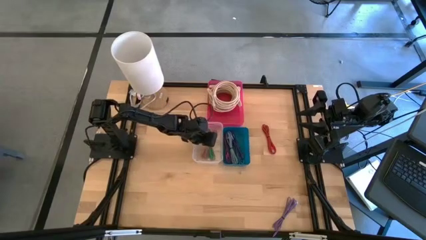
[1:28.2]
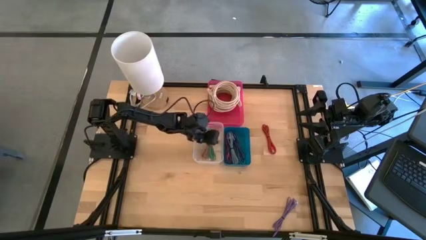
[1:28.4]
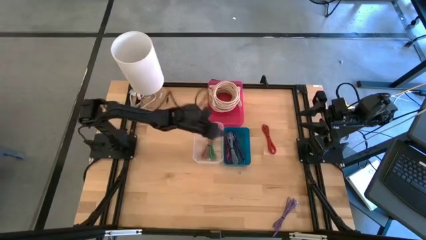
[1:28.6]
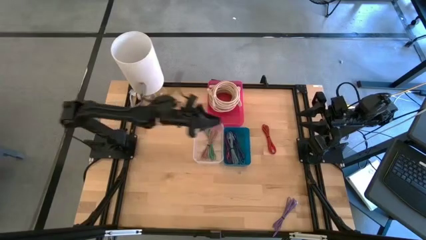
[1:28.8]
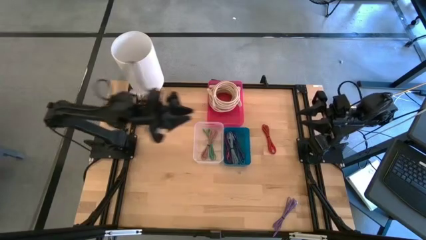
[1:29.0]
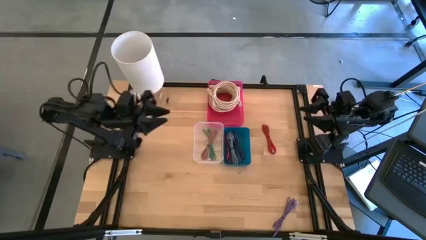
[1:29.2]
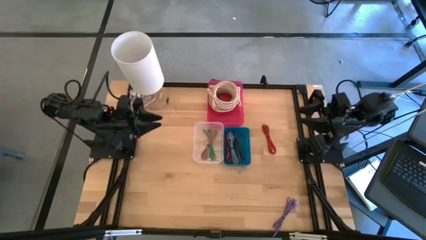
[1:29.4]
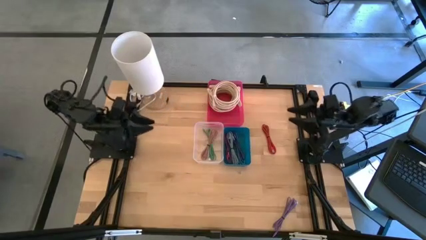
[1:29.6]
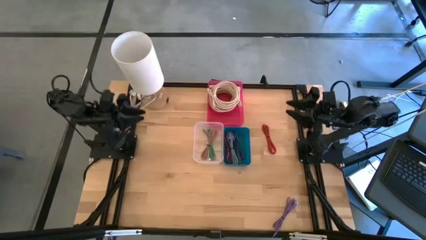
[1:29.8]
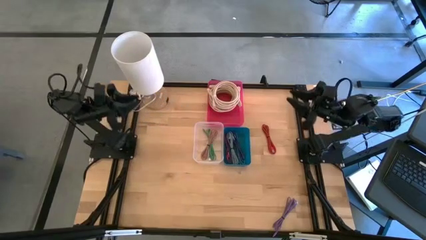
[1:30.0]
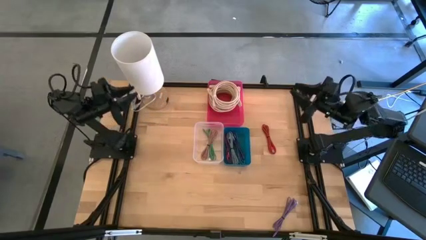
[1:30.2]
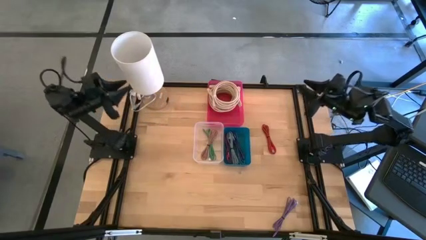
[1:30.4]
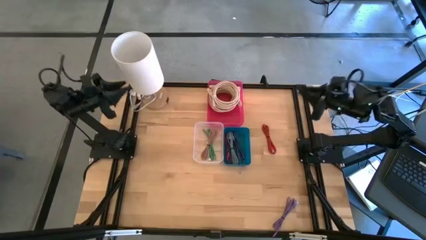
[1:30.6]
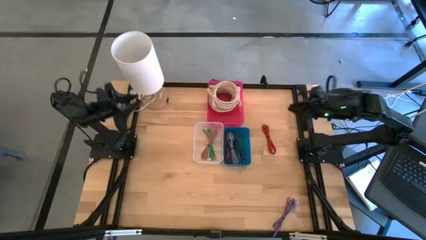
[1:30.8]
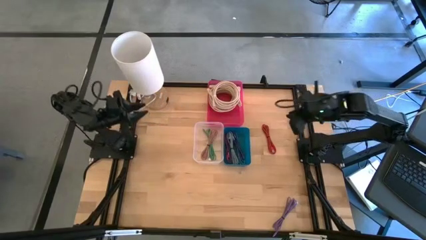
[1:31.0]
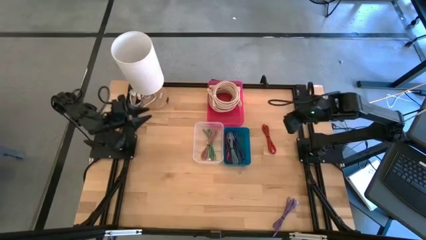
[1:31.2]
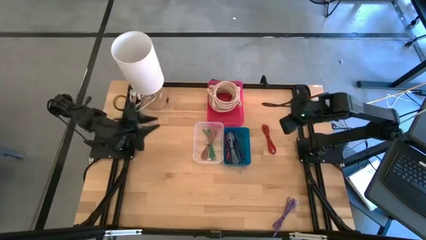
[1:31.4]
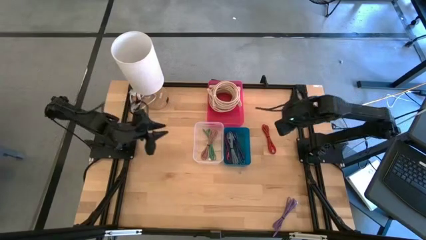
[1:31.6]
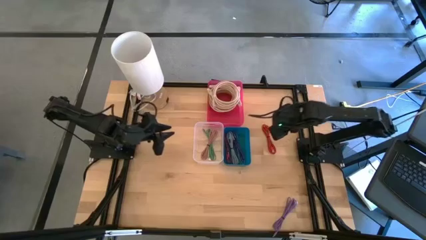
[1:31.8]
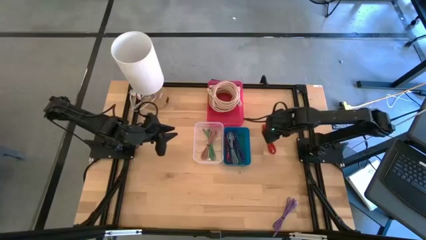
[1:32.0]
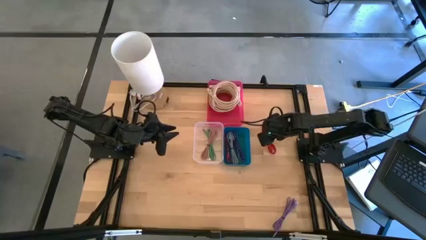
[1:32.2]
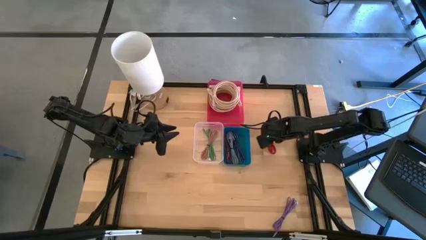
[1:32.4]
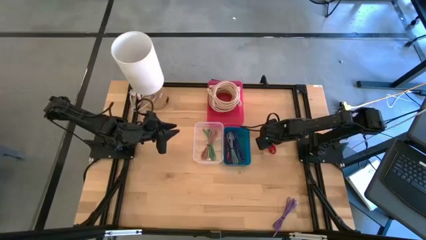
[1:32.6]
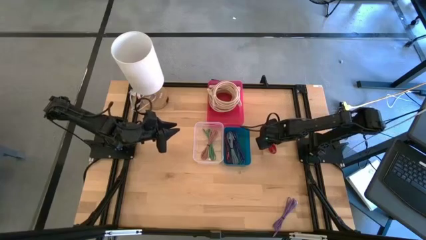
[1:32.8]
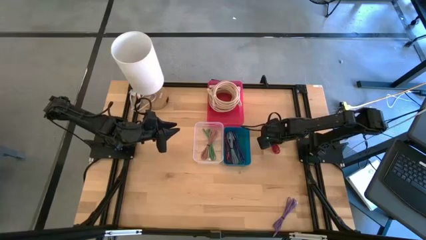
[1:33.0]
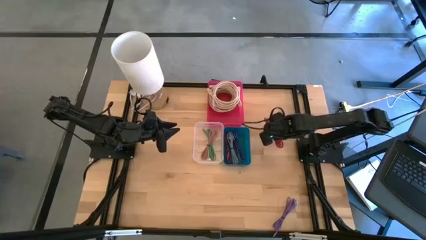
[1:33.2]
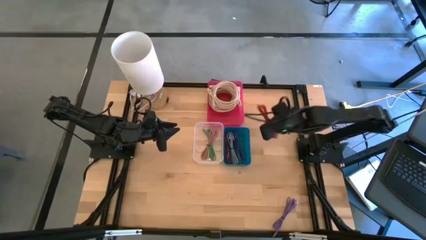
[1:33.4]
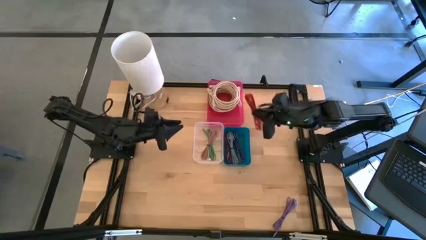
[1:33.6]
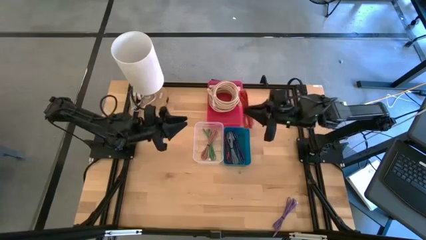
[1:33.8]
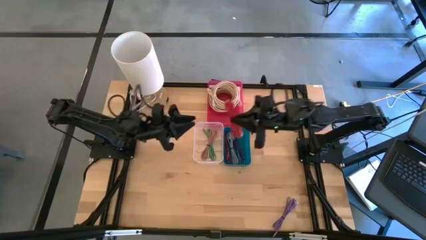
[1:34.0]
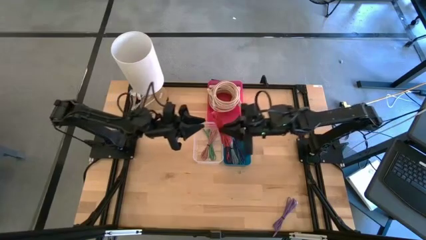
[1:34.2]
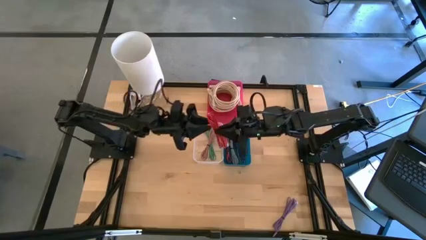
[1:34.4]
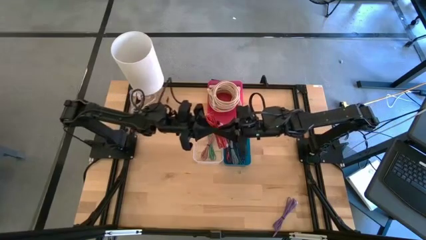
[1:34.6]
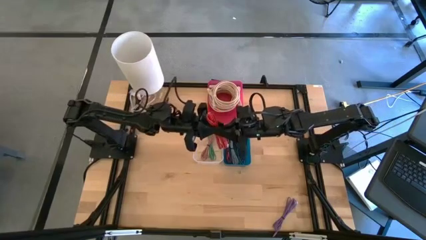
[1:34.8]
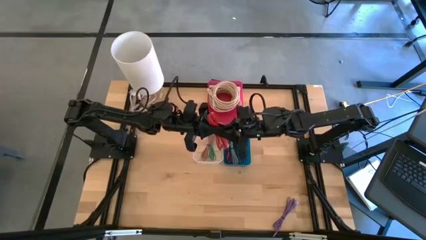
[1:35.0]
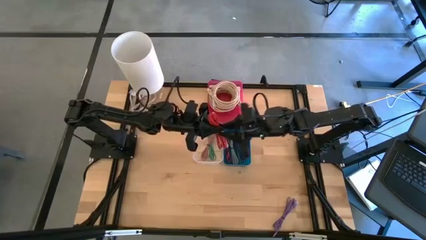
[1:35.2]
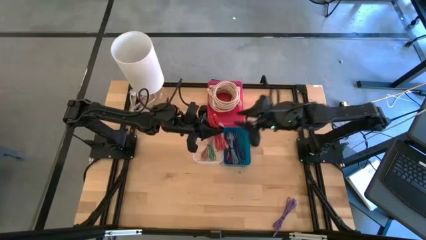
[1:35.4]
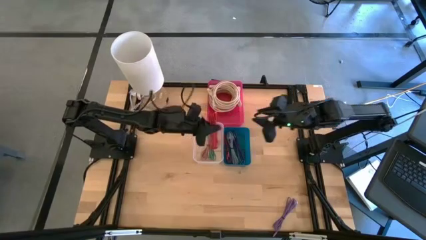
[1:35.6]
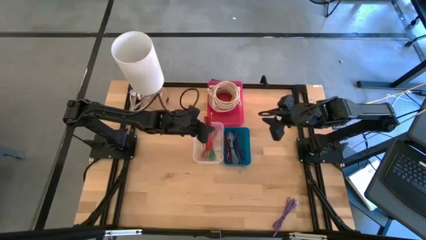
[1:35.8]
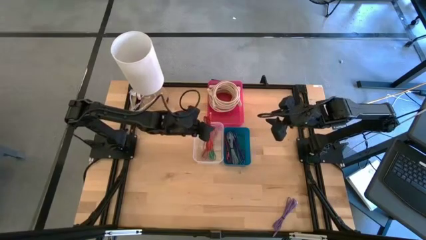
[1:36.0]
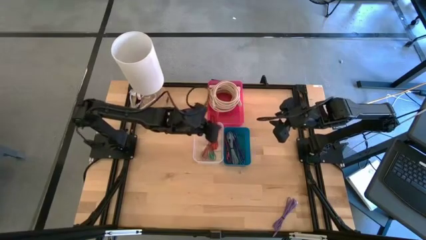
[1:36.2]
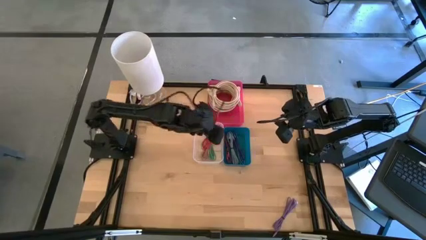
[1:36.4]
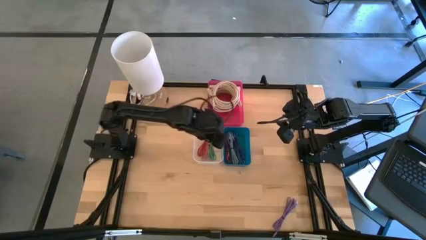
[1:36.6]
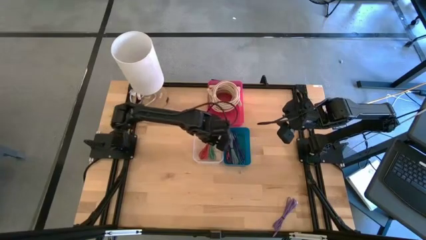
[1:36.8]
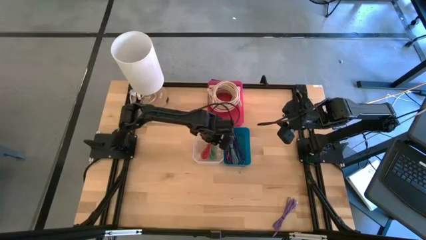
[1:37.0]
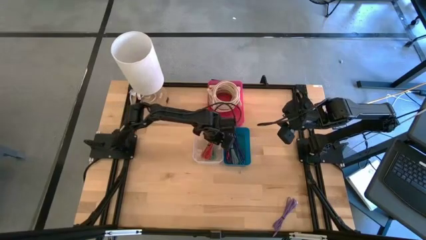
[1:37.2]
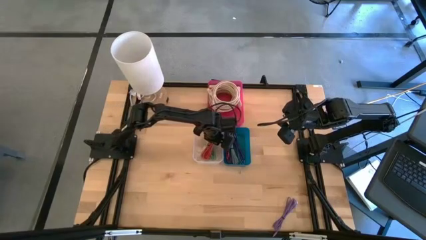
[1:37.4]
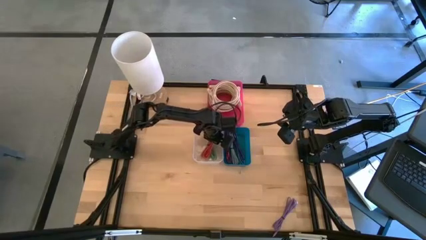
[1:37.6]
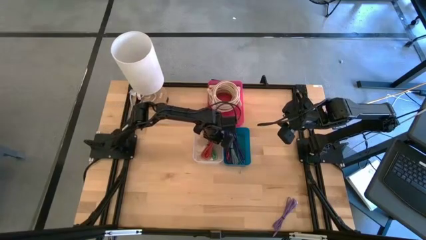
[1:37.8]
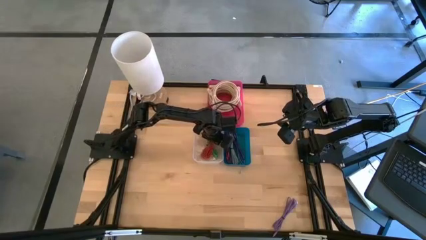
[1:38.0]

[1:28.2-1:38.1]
Task: Pick & Place USB Port
Put the red charger cable into the transparent bin

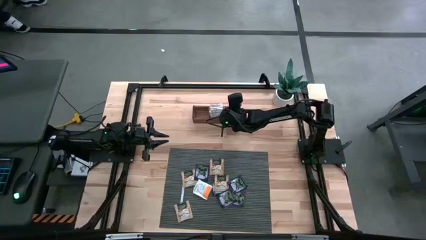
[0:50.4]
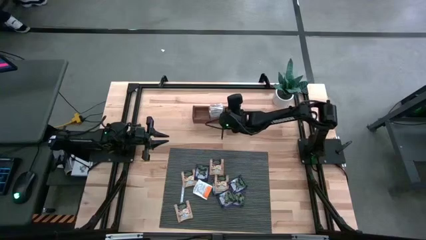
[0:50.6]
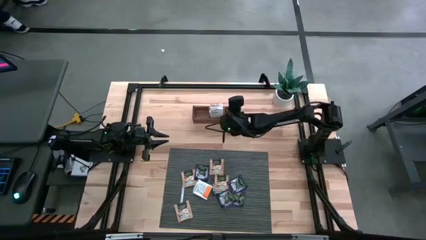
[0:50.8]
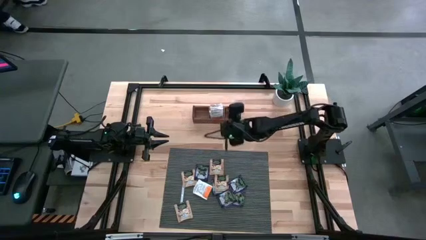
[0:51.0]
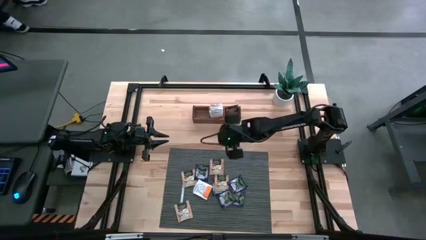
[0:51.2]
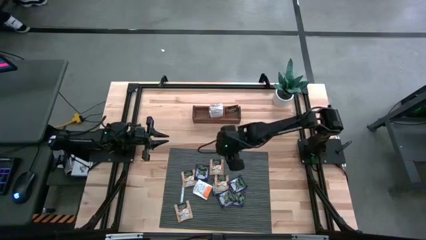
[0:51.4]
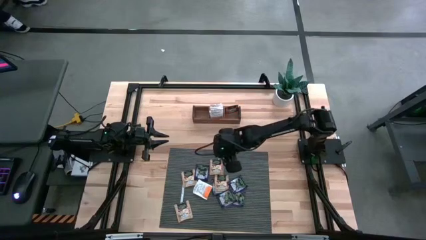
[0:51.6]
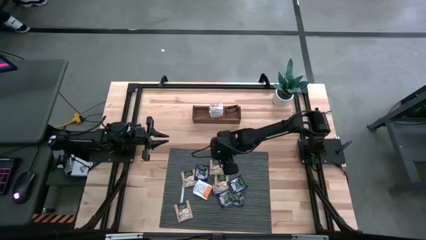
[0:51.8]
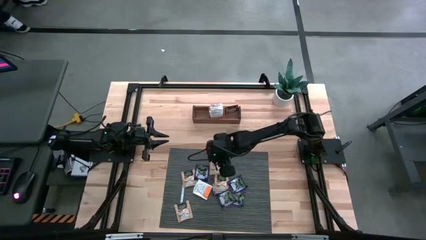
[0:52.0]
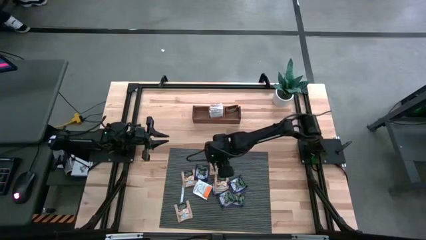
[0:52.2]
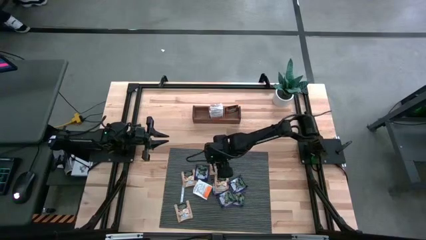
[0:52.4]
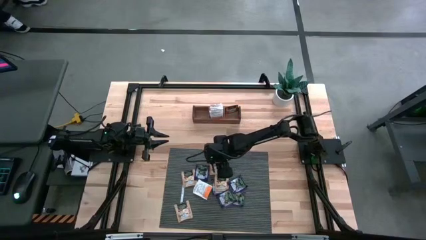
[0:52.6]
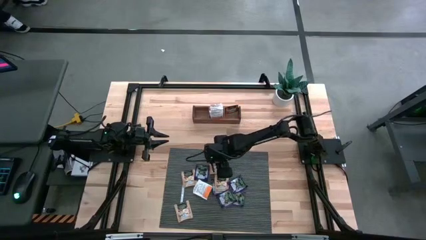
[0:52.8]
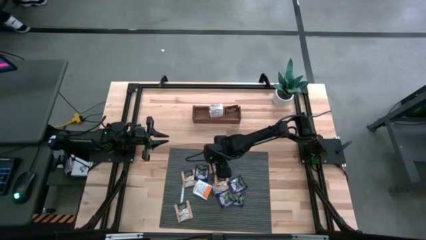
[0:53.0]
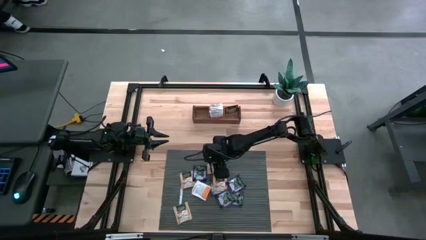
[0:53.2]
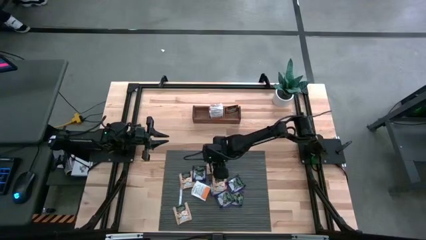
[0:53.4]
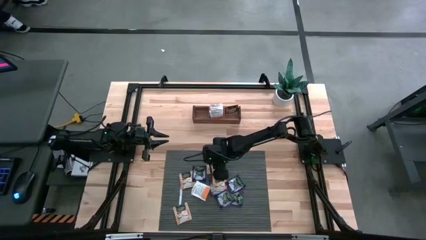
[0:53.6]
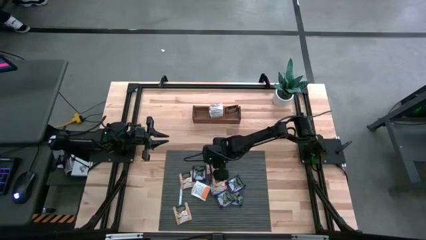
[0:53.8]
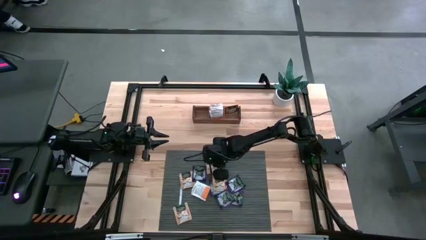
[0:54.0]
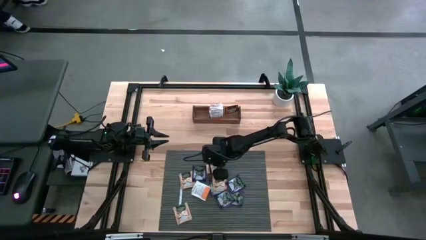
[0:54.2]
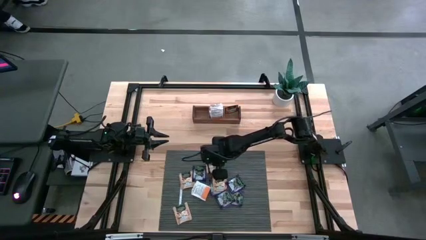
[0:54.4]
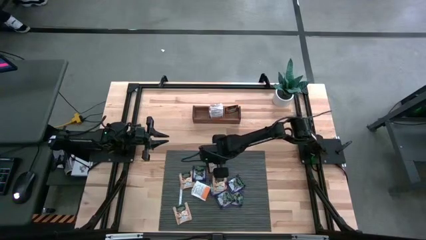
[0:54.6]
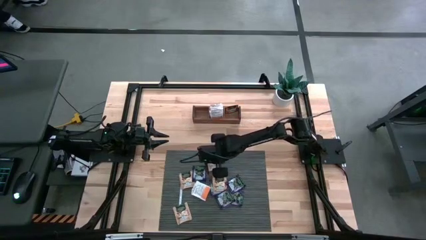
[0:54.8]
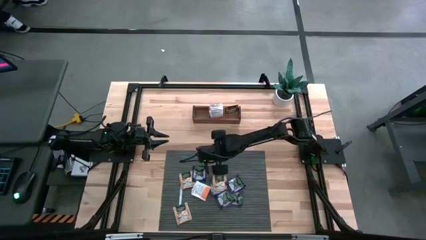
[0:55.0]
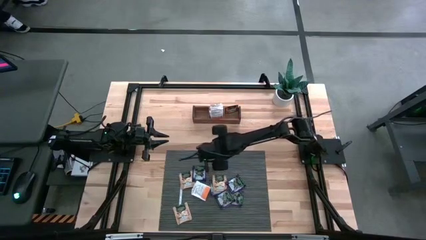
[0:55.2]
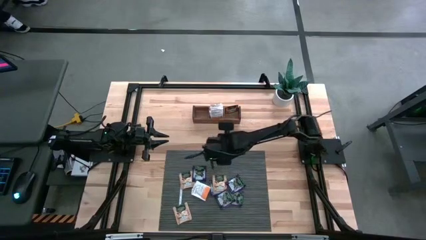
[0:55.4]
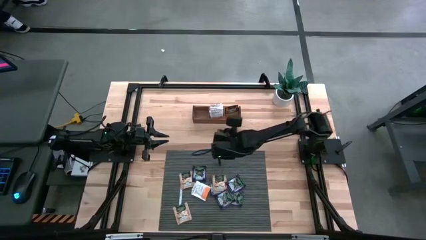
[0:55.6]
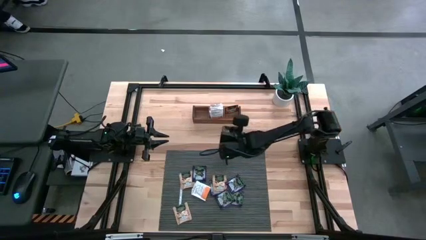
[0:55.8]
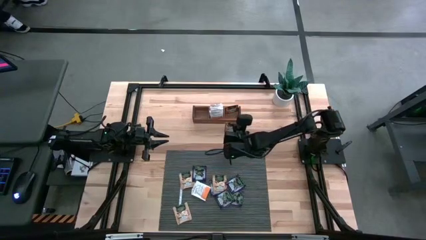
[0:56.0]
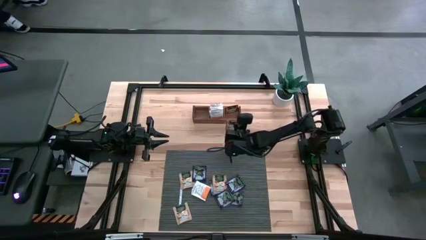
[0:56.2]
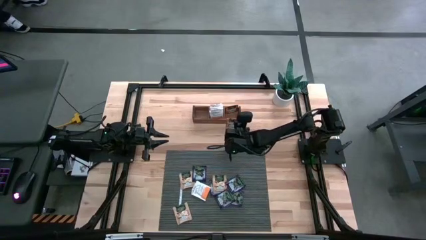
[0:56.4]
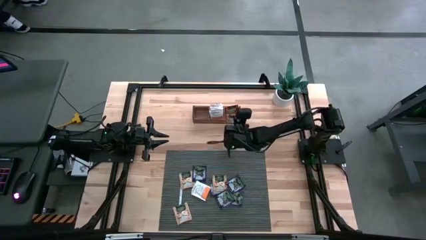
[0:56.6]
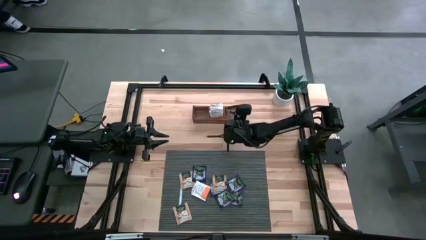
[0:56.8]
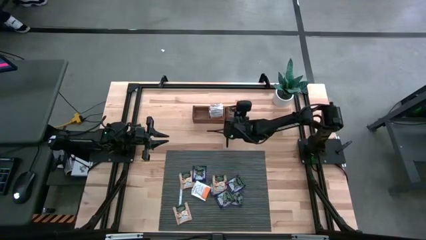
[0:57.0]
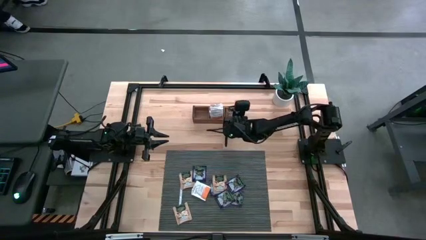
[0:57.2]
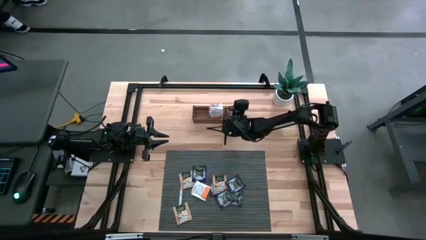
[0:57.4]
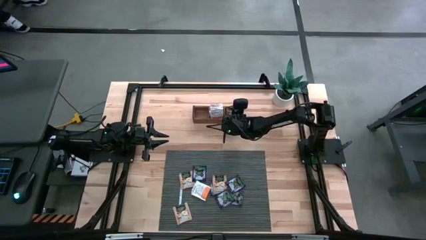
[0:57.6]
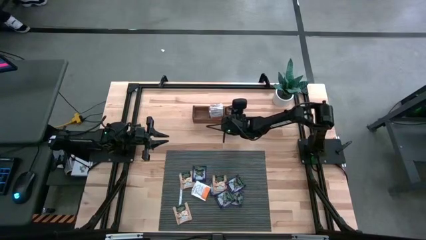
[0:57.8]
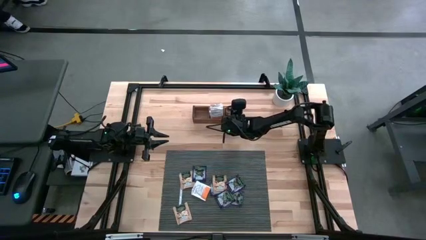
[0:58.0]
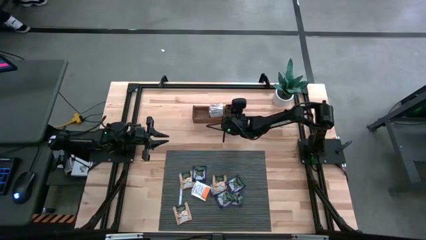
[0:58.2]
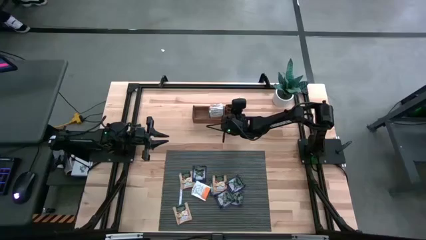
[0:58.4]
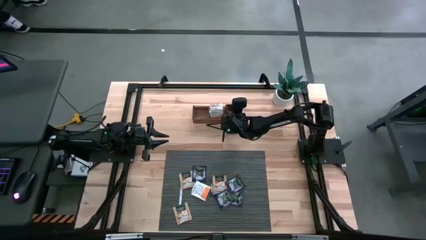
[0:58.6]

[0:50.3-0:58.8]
Task: Pick & Place Tea
Put the light brown tea bag into the right compartment of the wooden organizer
